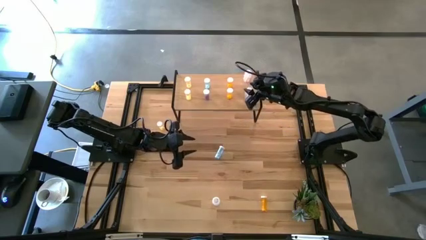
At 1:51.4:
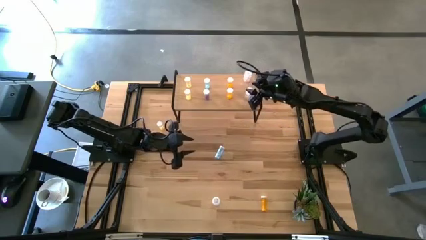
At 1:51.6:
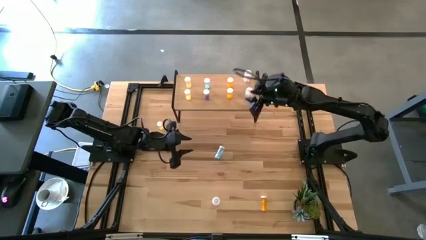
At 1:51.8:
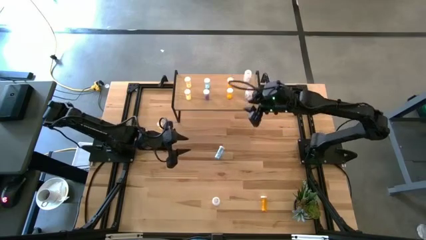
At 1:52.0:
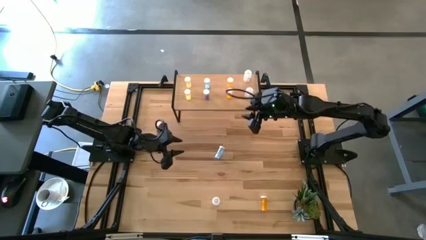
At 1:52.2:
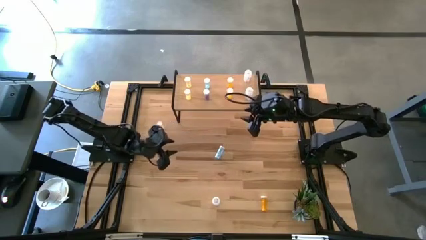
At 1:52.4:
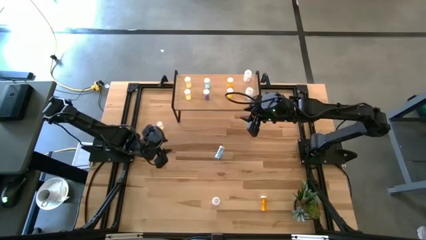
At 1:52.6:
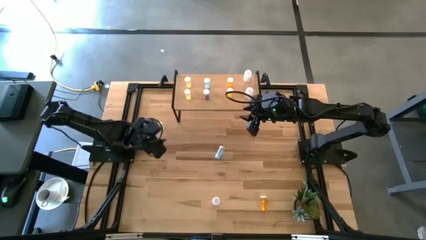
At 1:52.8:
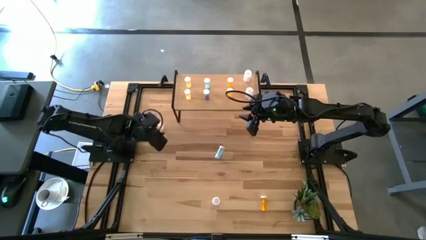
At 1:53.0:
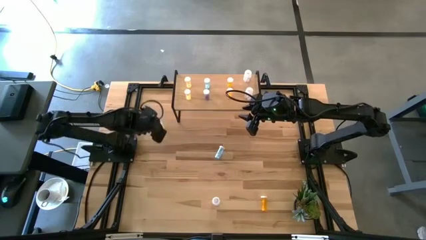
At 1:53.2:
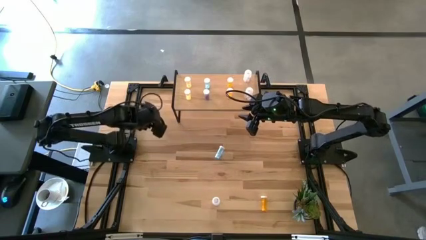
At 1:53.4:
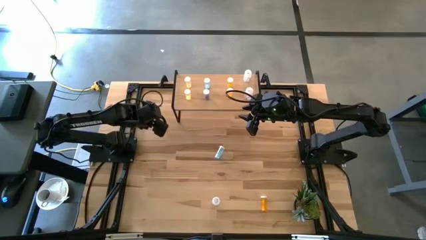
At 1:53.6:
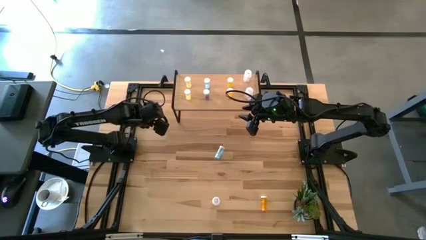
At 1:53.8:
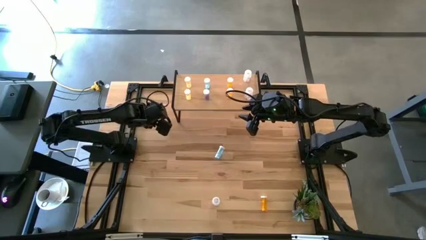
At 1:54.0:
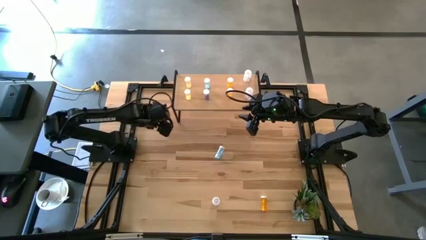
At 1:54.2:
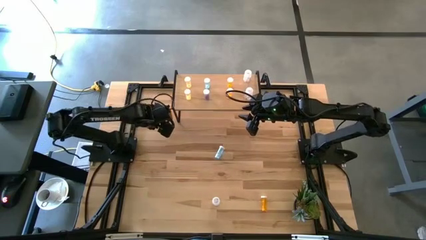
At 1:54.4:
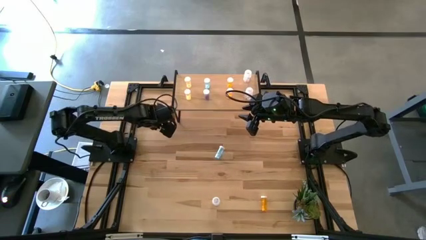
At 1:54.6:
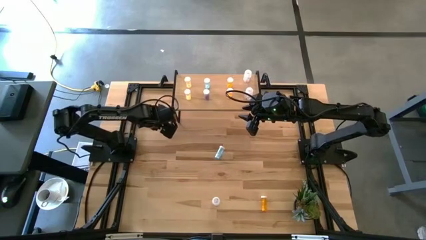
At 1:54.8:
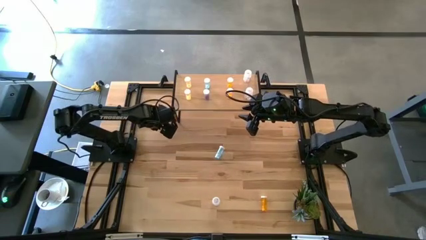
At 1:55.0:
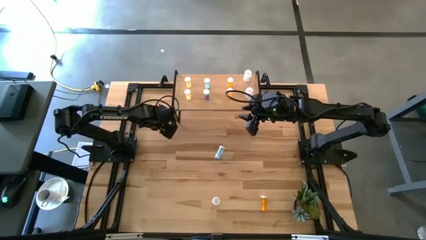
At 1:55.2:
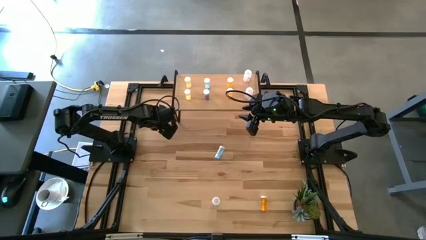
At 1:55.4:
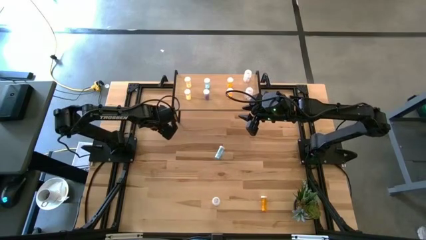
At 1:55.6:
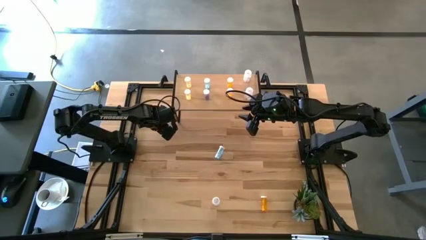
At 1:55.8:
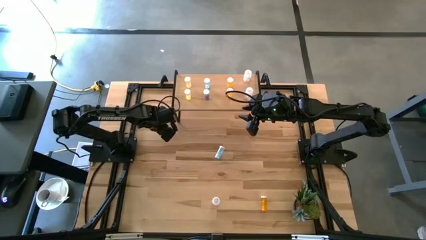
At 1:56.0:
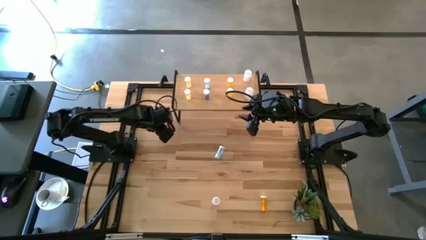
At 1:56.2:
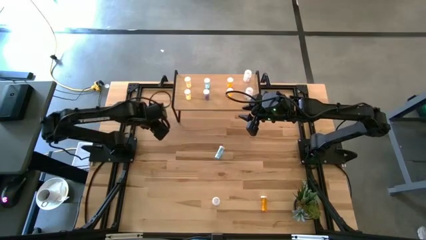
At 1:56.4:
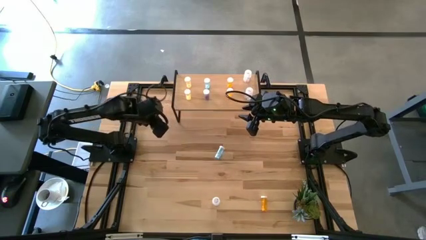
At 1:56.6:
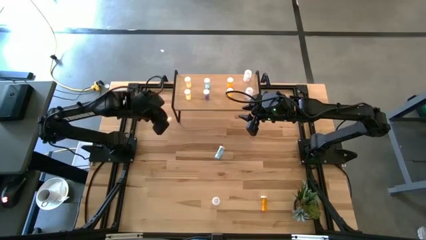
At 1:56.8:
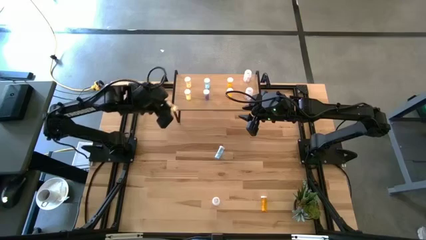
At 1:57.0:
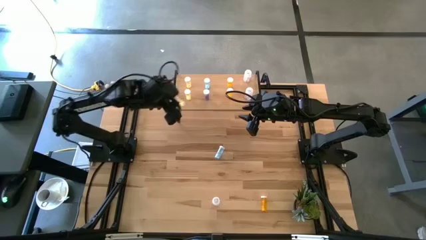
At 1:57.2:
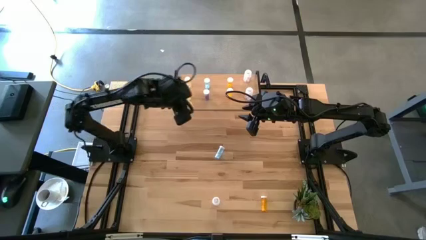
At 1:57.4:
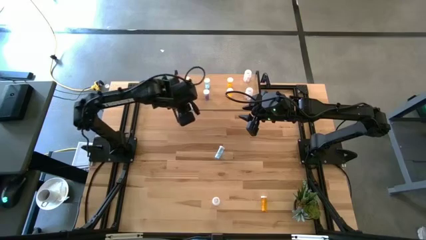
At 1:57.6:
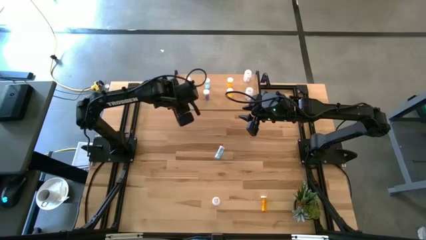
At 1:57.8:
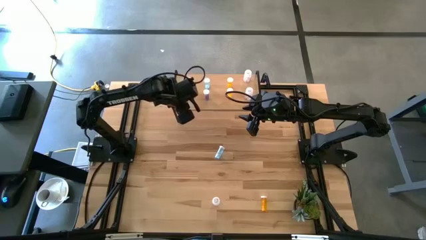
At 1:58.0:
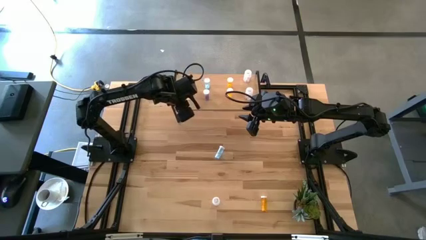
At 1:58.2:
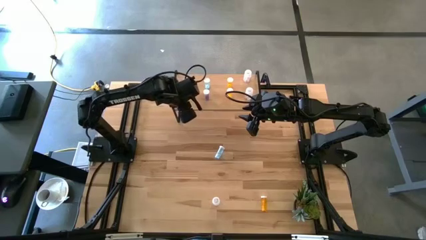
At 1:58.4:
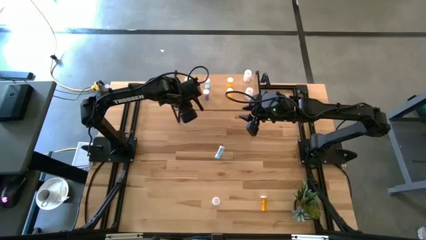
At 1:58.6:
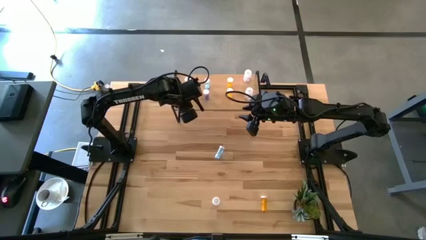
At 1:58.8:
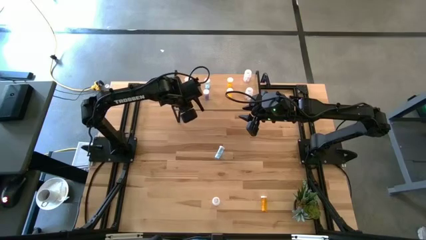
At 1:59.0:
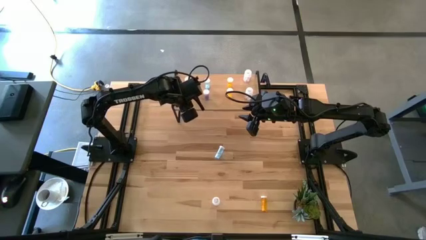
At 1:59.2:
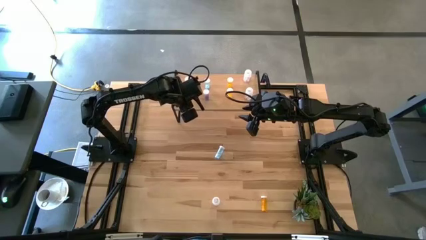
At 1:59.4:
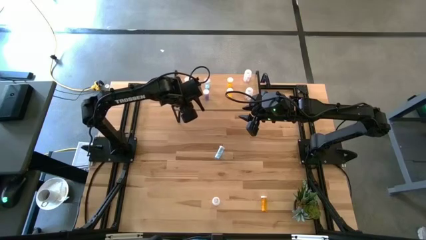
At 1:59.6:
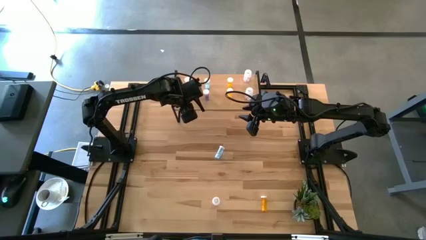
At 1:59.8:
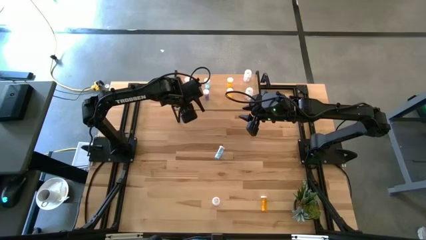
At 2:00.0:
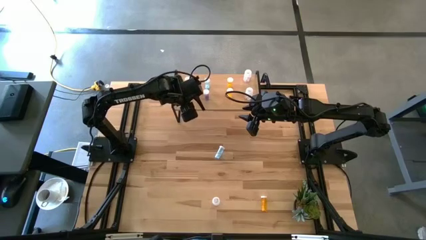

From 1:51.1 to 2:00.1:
Task: Pick and place medicine bottles onto shelf by color
Put the yellow pill bottle on the shelf aligned with the other yellow pill bottles

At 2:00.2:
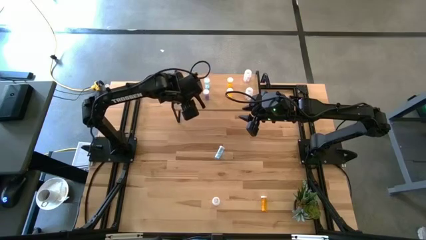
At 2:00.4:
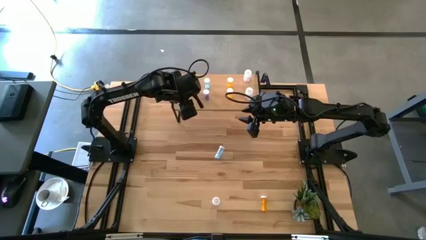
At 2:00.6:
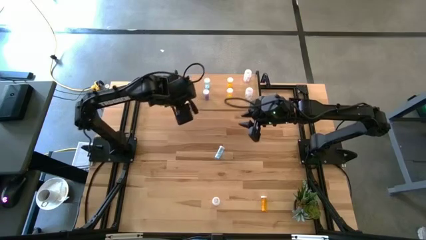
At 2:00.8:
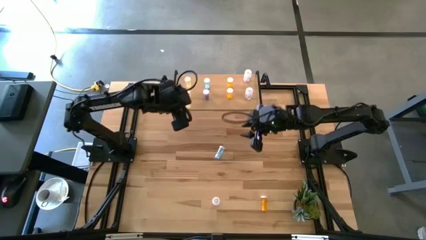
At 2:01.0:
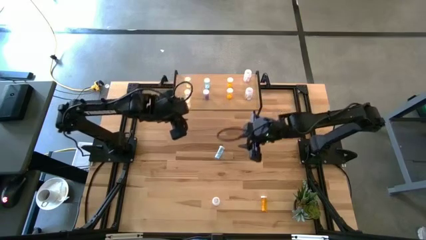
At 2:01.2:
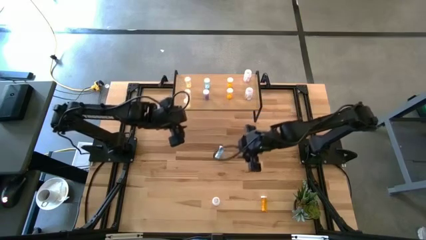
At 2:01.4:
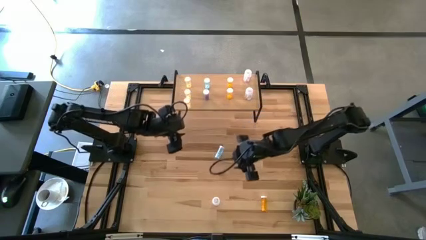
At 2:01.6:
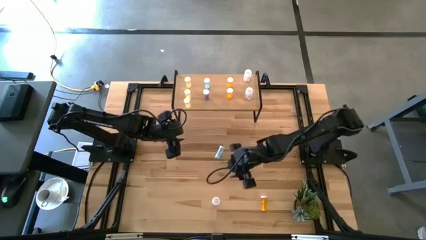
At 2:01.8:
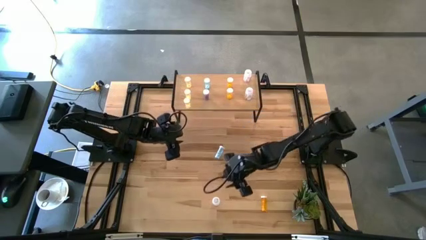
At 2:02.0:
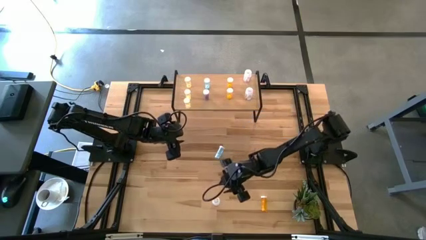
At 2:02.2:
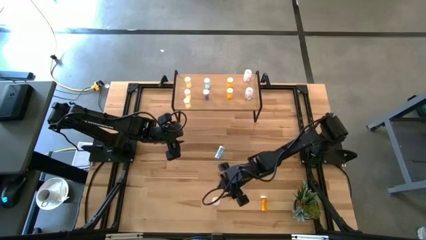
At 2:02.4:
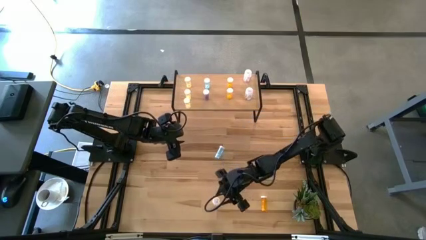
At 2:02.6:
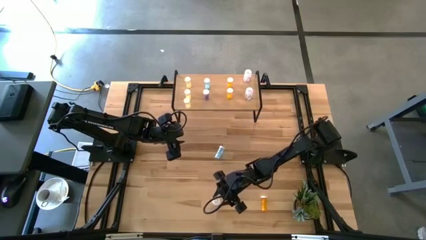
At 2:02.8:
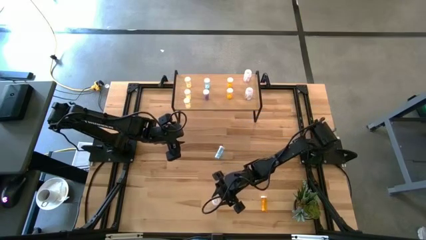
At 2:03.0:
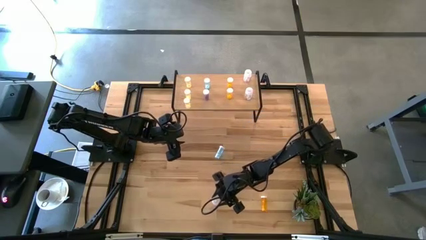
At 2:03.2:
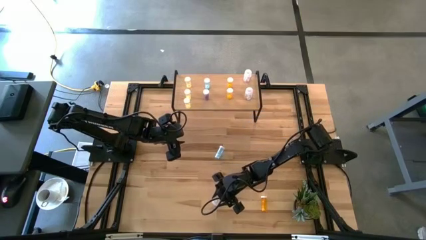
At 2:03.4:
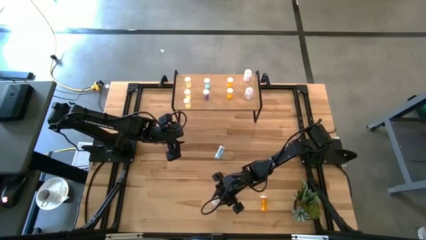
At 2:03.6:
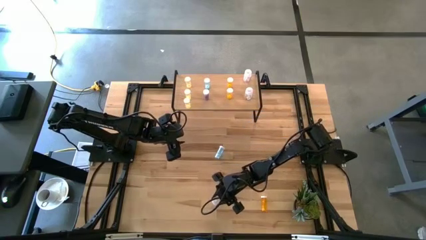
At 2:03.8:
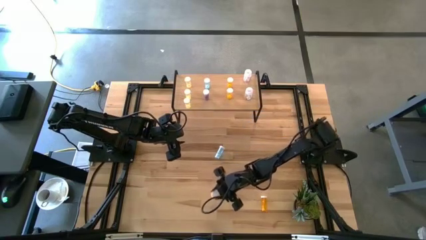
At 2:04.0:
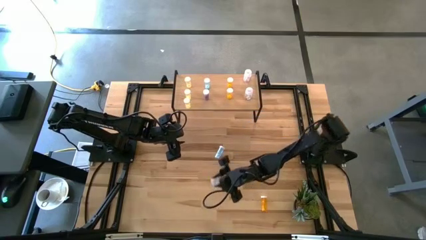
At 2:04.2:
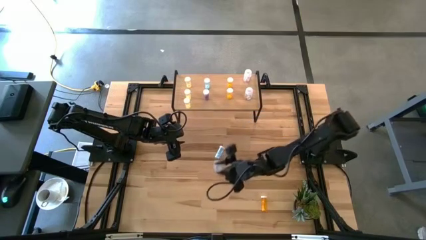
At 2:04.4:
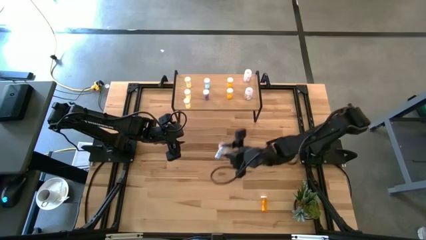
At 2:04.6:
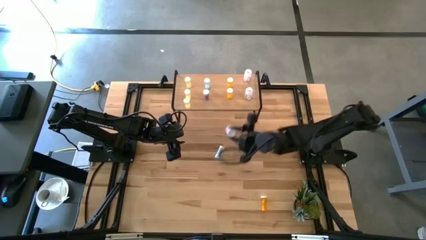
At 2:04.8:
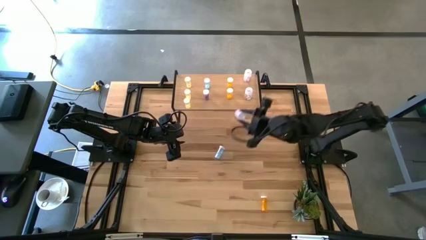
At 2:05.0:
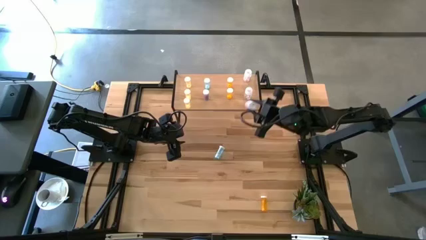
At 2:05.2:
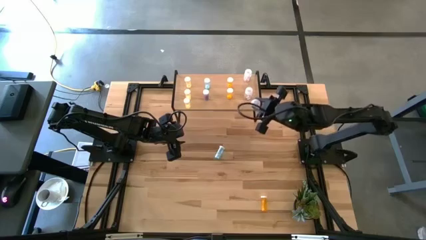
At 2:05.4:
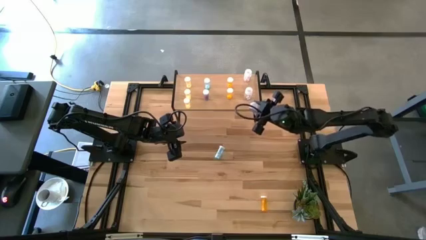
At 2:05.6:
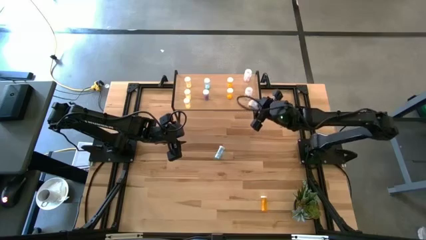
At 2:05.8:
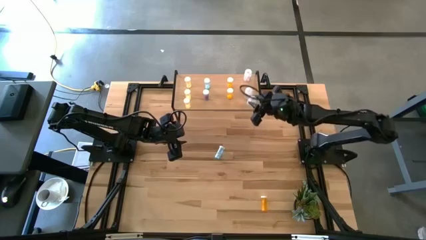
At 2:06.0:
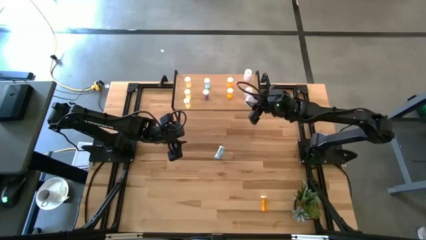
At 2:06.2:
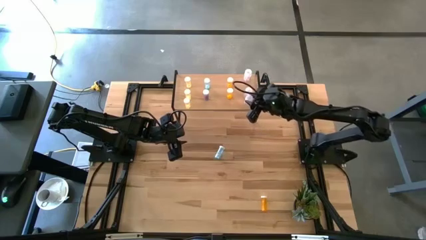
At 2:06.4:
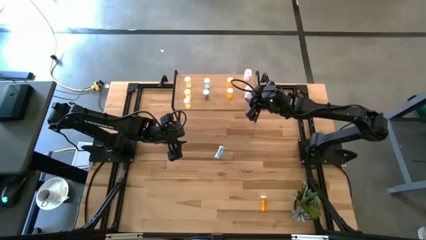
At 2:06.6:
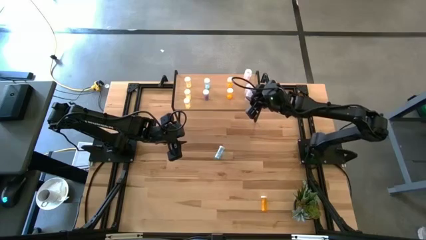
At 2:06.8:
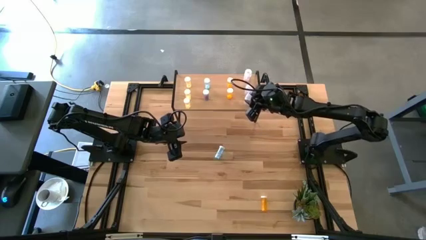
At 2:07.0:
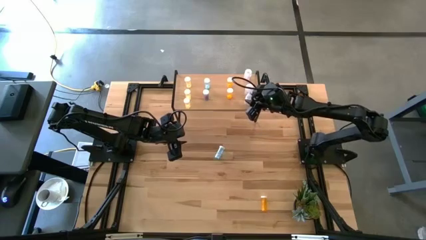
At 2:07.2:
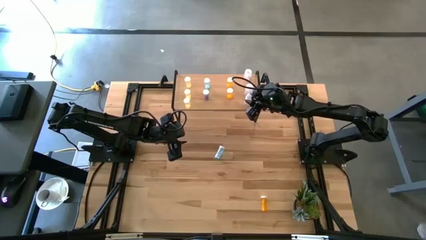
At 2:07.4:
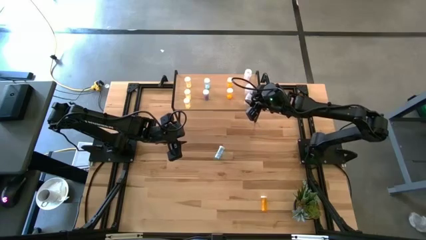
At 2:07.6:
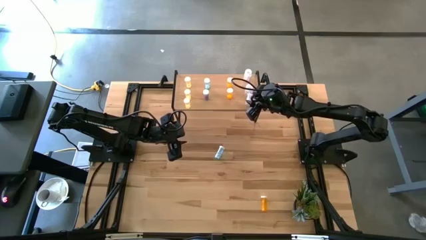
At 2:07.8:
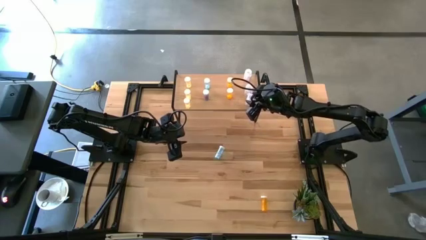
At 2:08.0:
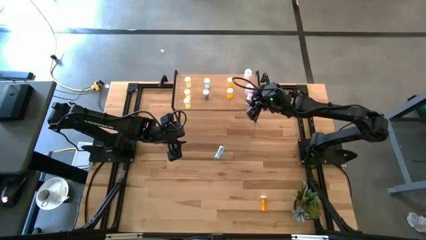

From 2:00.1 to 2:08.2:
Put the transparent pill bottle on the shelf aligned with the other transparent pill bottles
